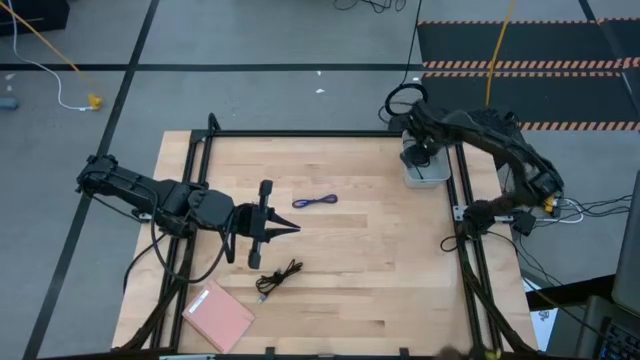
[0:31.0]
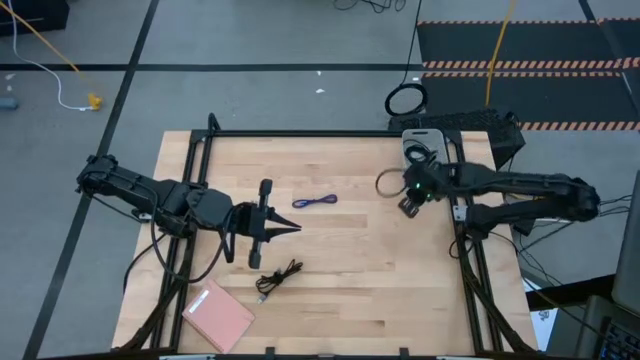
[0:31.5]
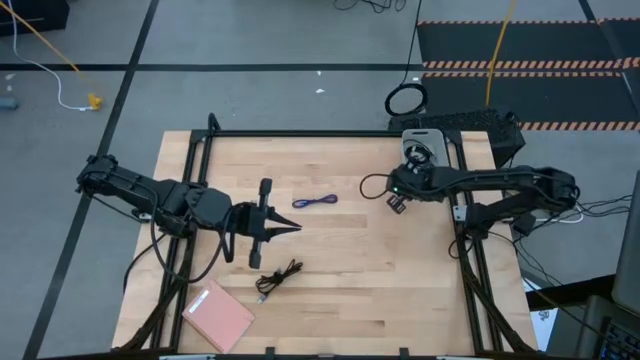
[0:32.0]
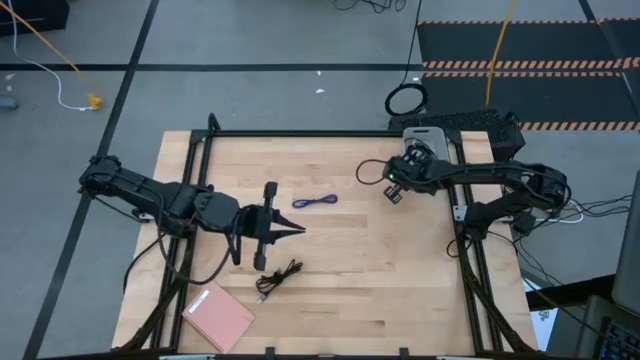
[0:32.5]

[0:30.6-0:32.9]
Task: Pick and place USB-C Cables
Adjust the white bin

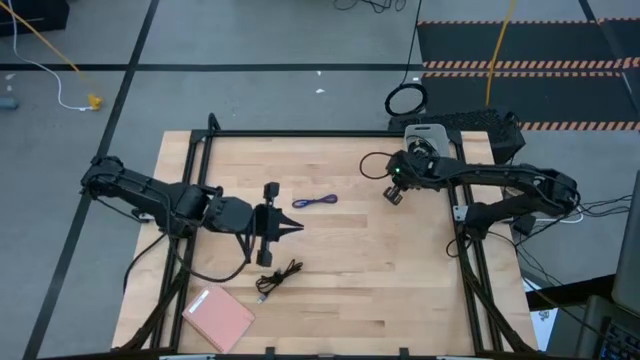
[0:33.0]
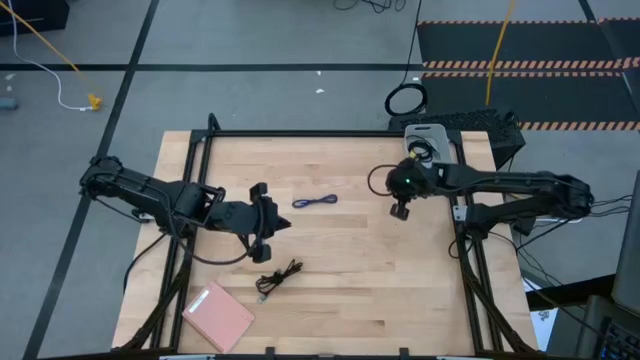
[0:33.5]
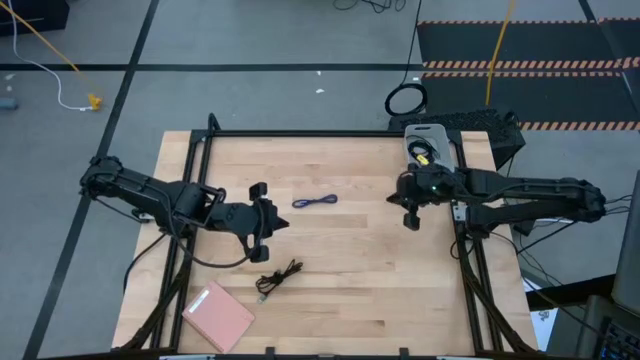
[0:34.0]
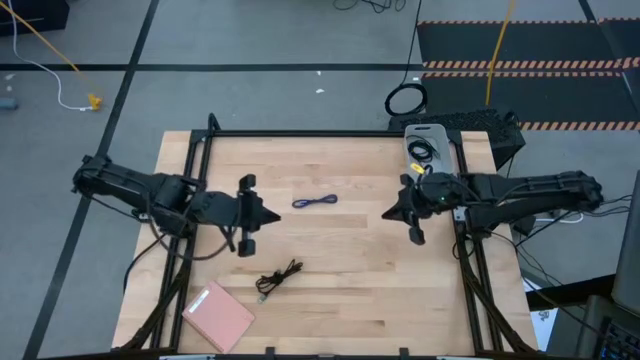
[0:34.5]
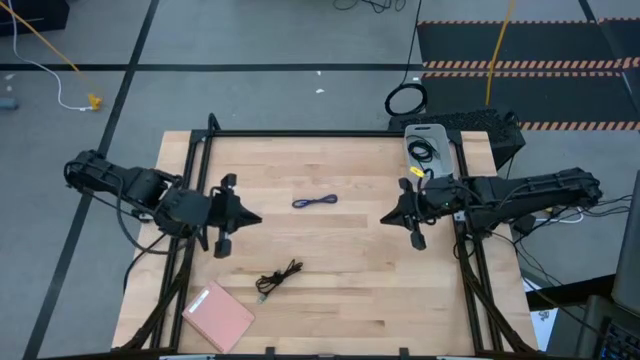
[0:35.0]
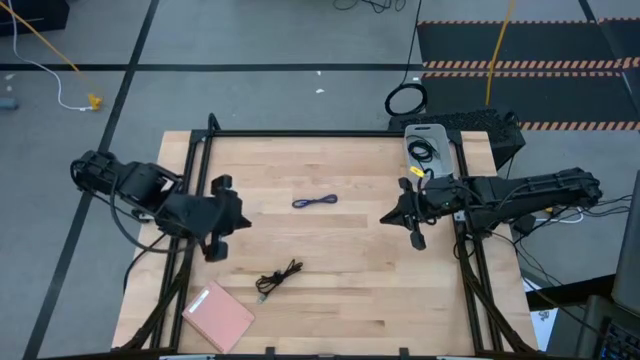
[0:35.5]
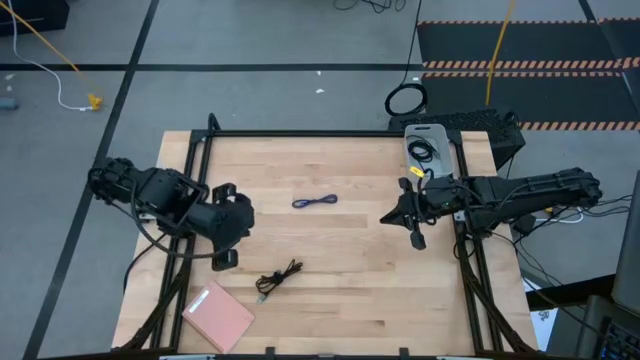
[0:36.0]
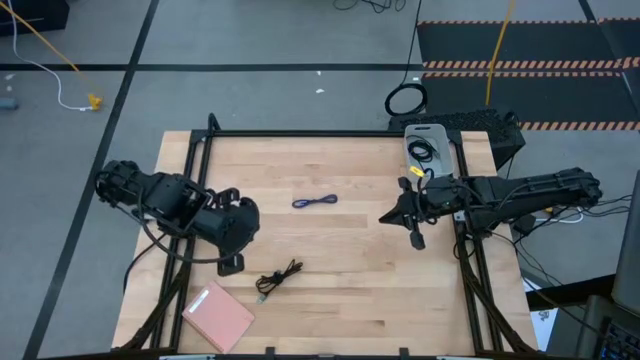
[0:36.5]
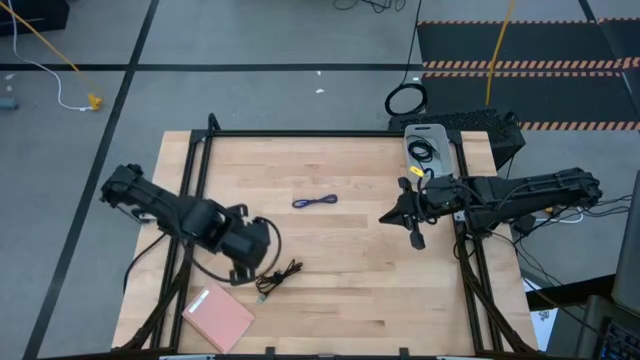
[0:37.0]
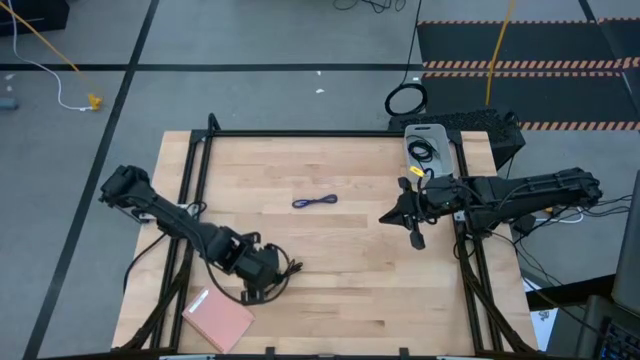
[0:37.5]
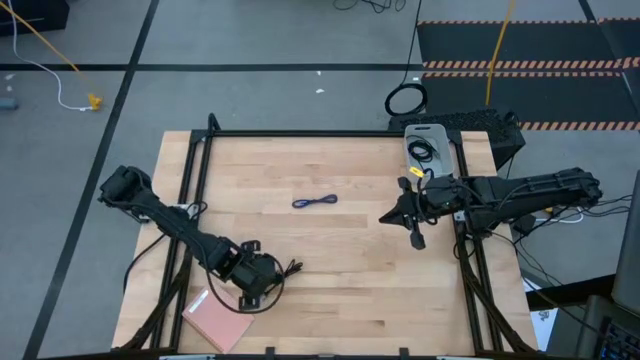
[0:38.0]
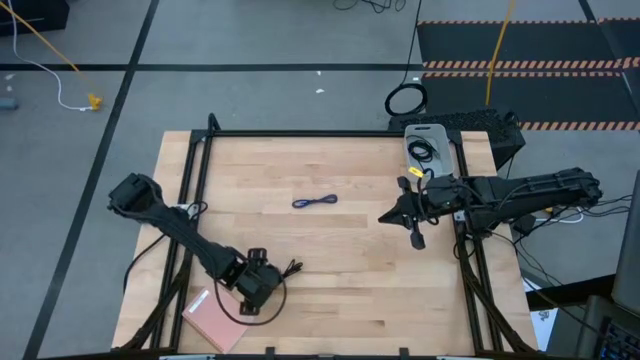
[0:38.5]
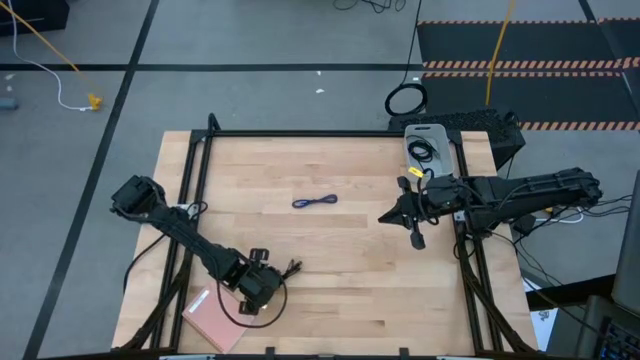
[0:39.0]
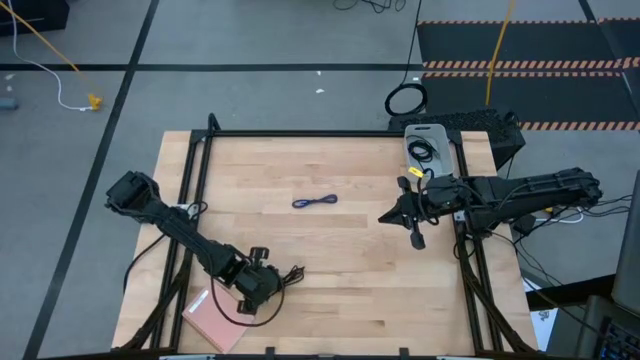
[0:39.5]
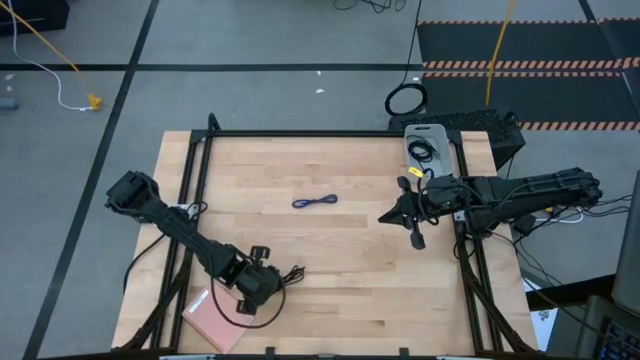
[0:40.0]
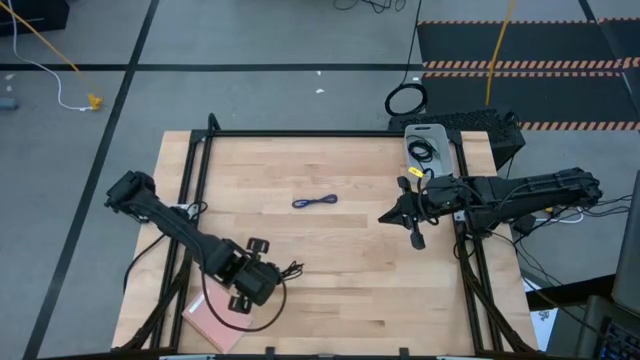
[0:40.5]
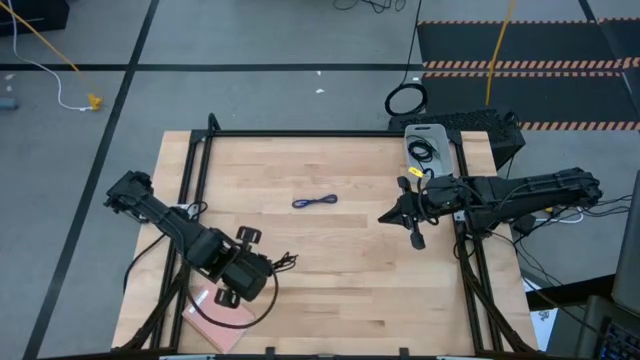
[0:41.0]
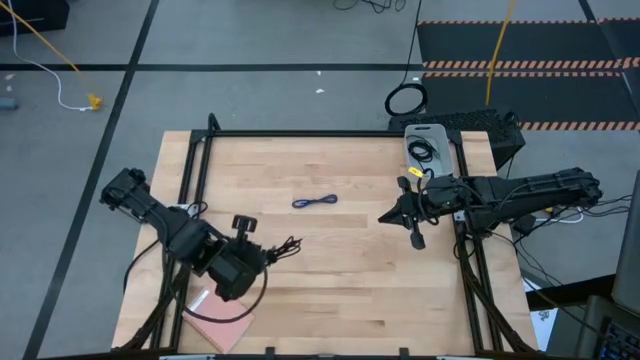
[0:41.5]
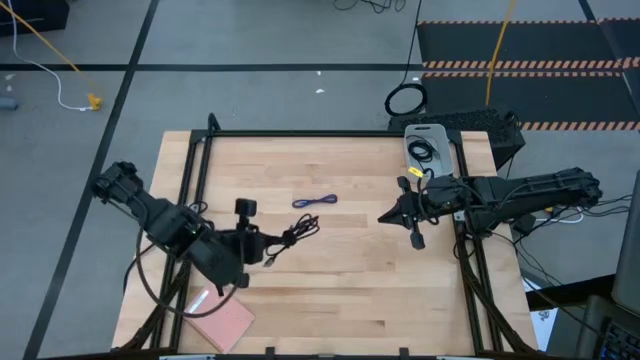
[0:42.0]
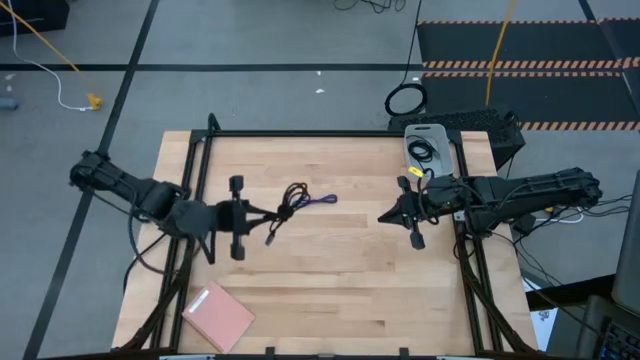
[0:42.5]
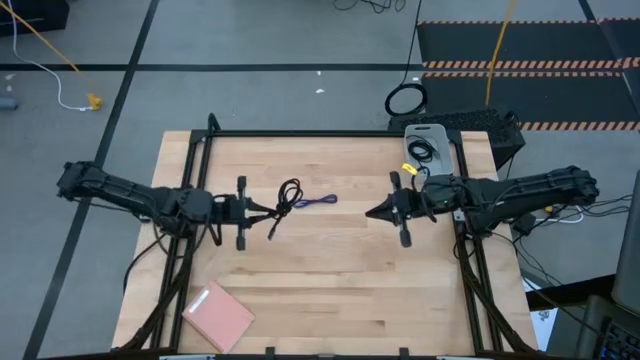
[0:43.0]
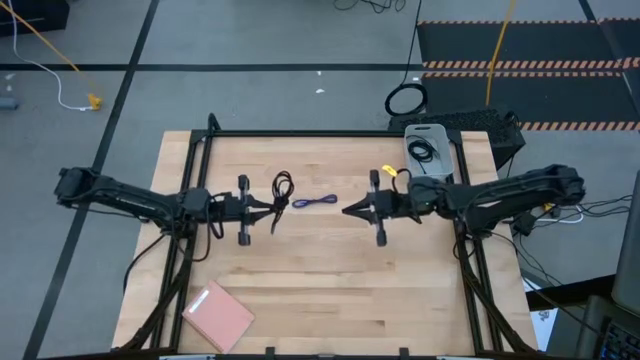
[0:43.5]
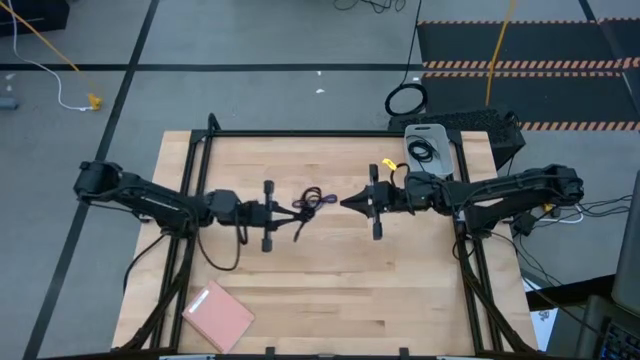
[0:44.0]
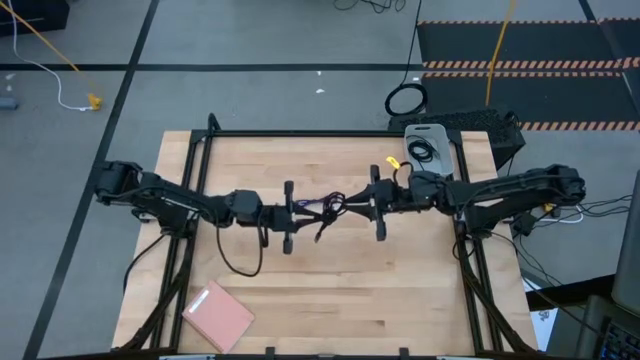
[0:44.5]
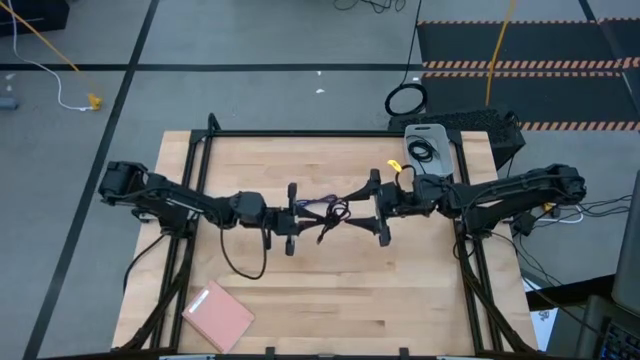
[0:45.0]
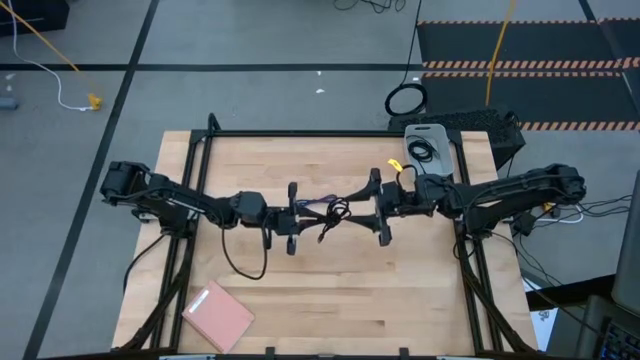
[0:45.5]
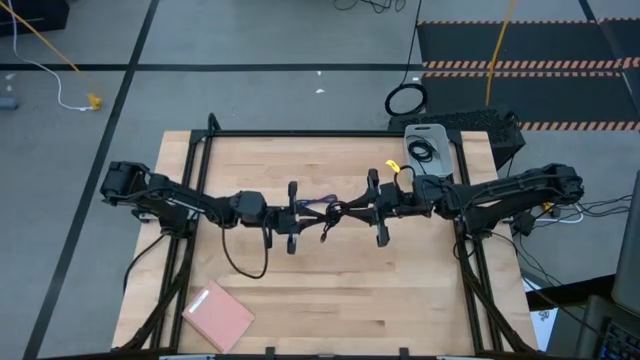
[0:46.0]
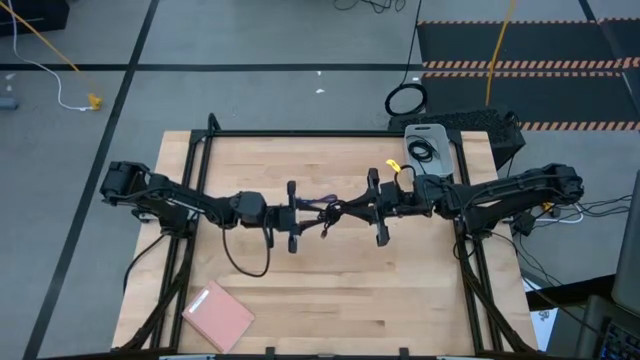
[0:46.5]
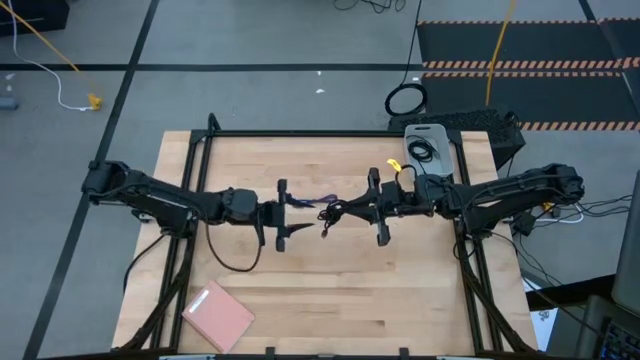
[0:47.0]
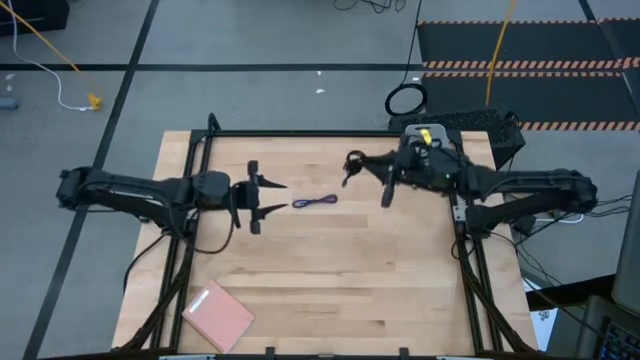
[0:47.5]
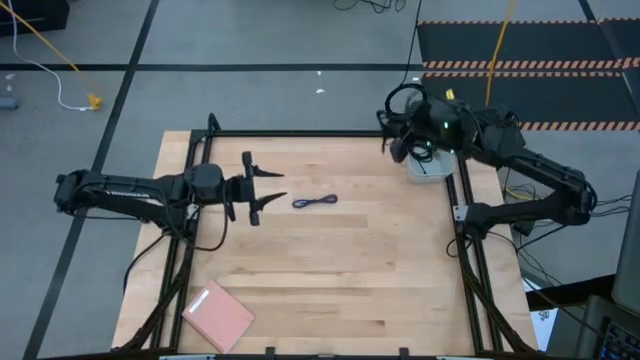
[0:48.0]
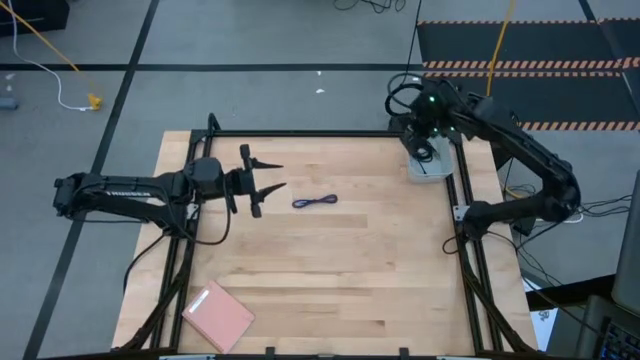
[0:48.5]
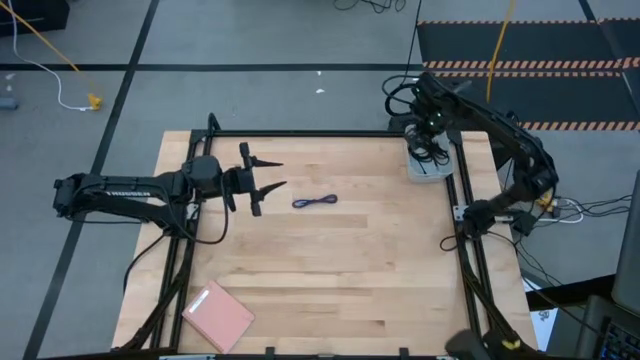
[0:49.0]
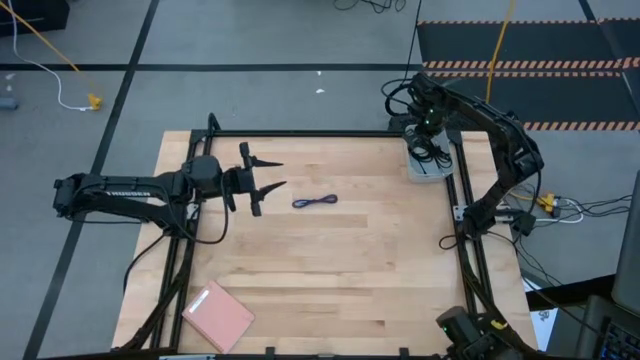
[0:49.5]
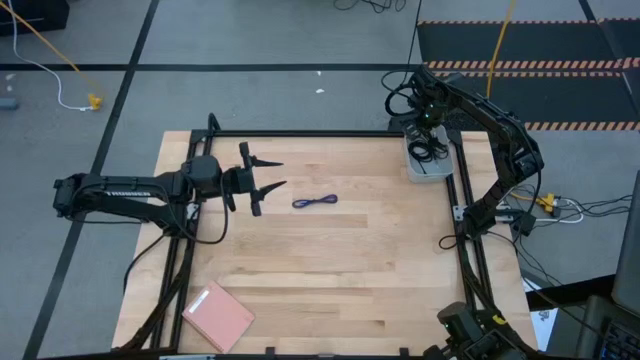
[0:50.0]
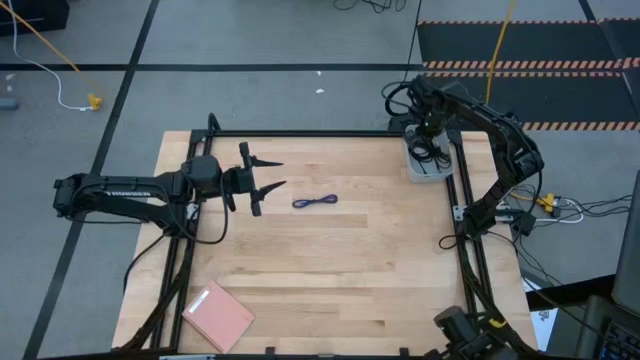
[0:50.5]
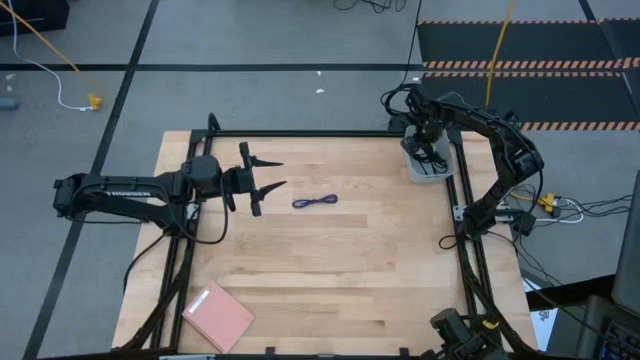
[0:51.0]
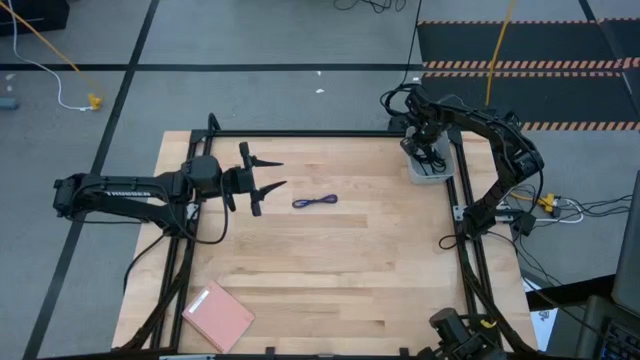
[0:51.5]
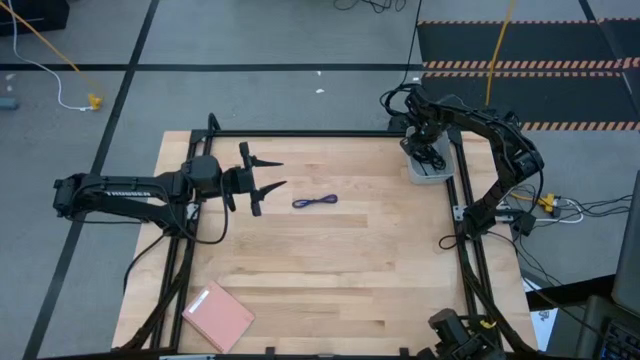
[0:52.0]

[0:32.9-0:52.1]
Put the black charger cable into the white bin
